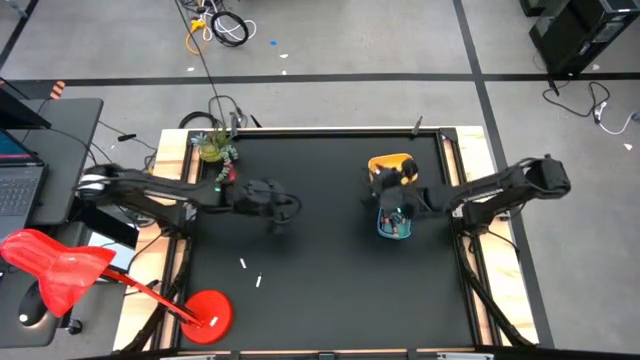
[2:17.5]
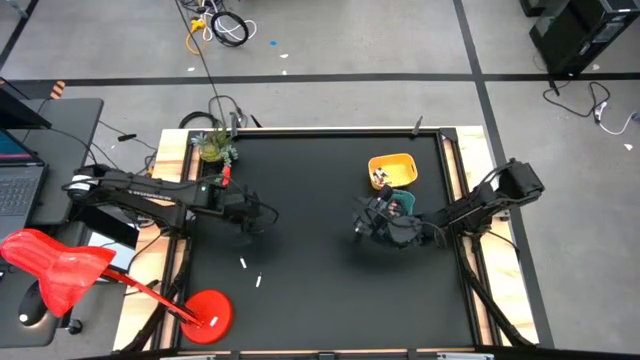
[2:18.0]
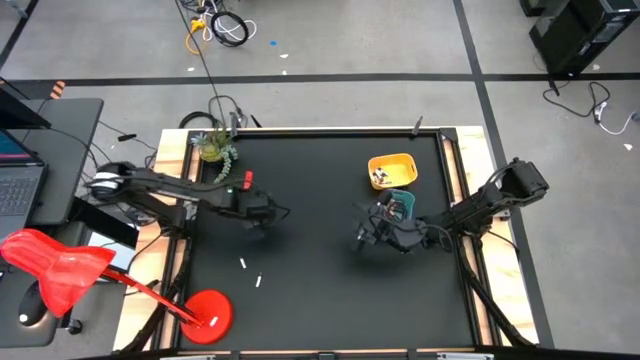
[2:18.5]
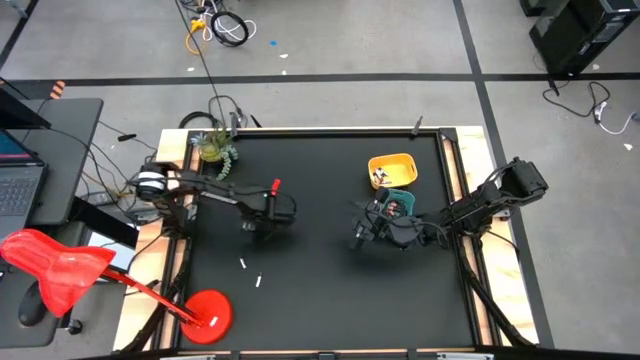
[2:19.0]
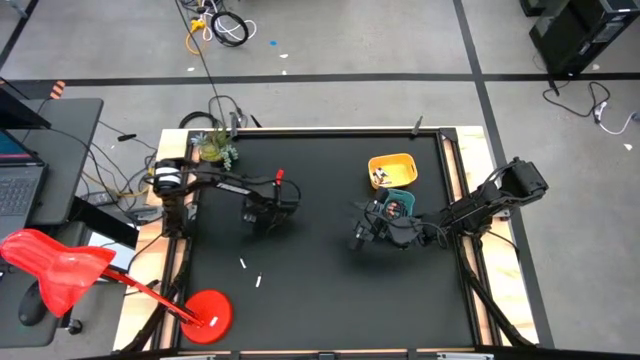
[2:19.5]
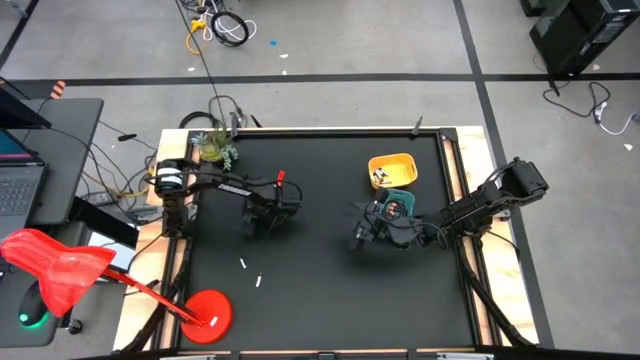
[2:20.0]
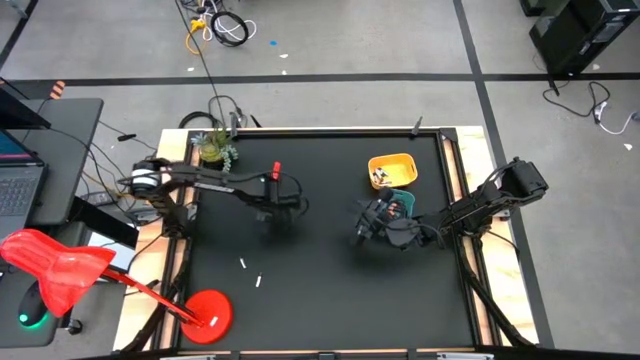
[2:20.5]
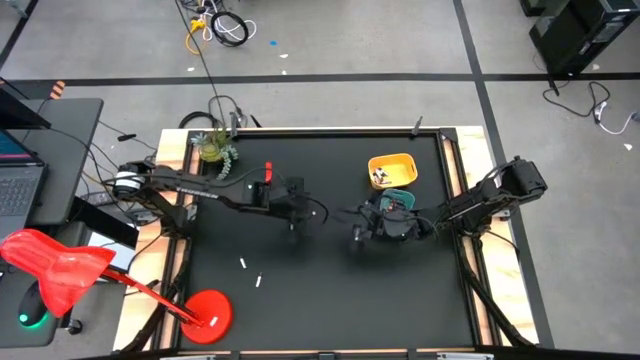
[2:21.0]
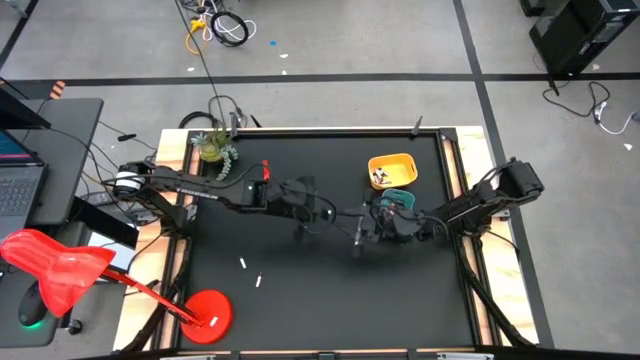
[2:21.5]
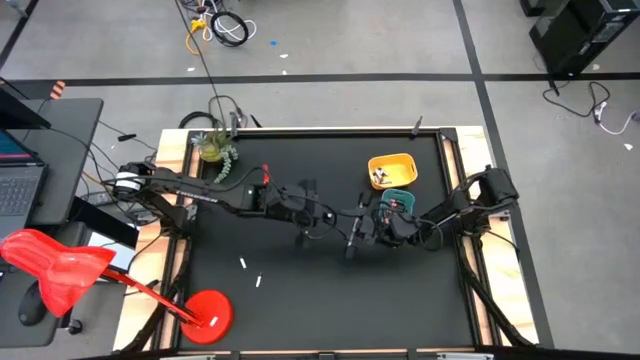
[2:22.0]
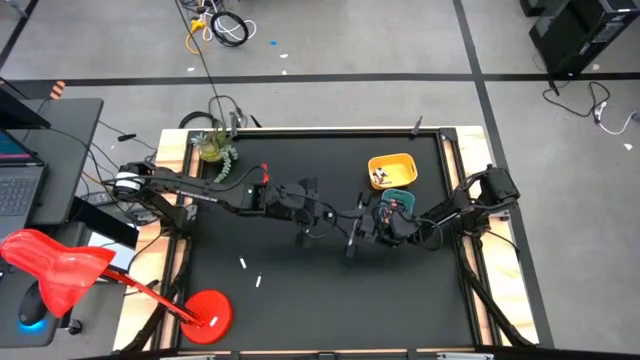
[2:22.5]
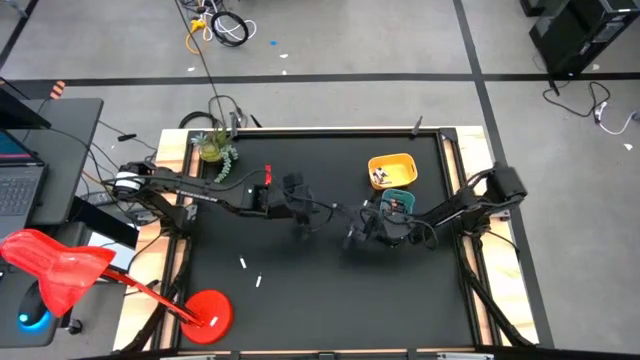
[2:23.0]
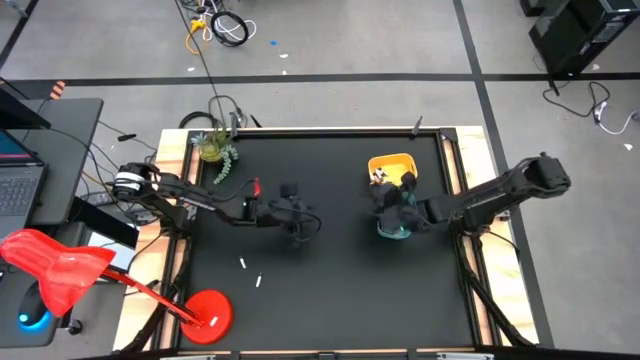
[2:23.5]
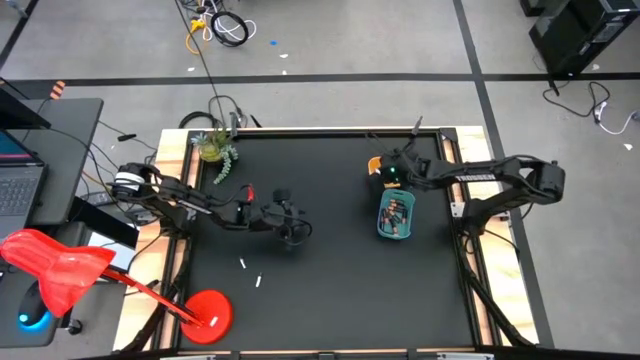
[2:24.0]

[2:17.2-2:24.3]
Task: Sort batteries
Put the top silver black battery into the yellow bin

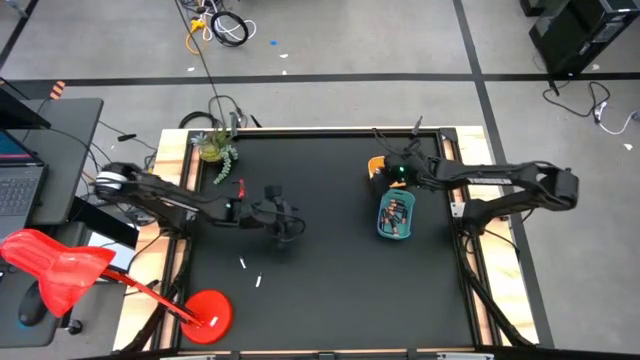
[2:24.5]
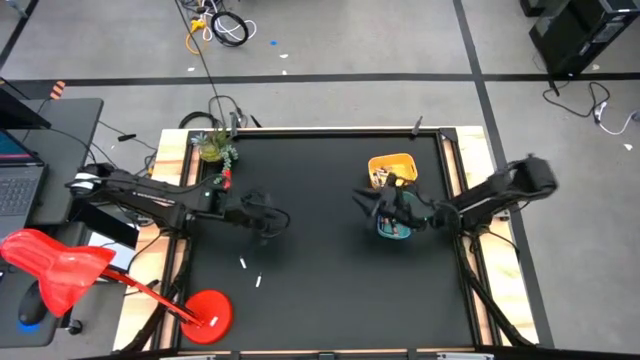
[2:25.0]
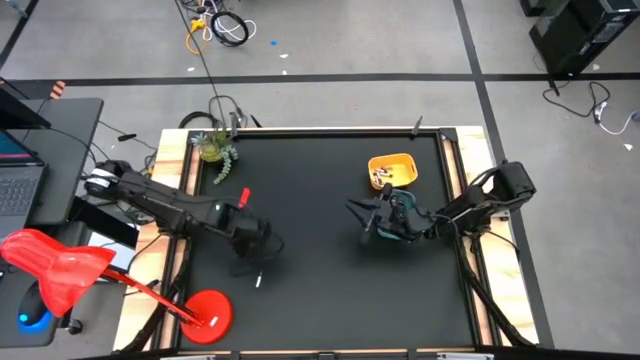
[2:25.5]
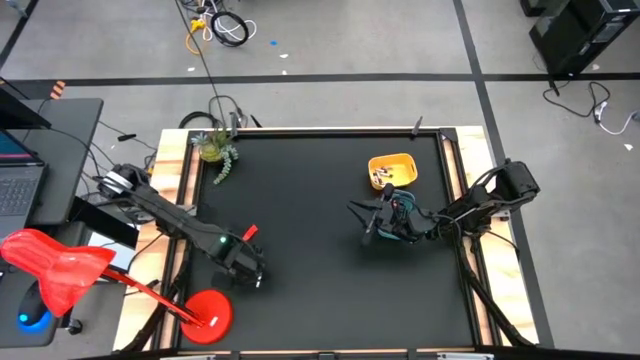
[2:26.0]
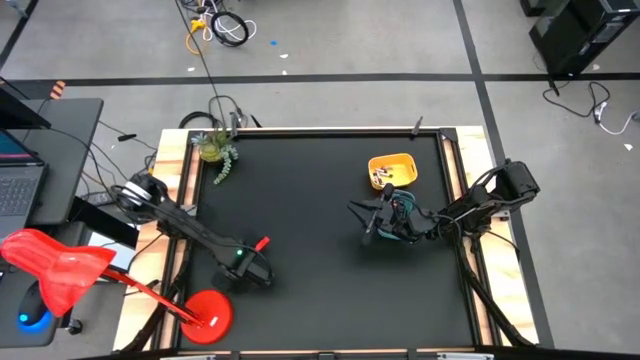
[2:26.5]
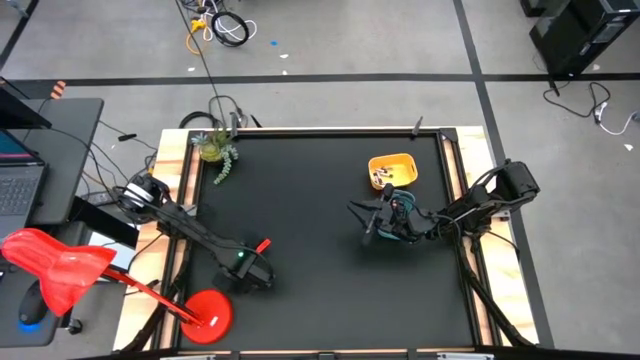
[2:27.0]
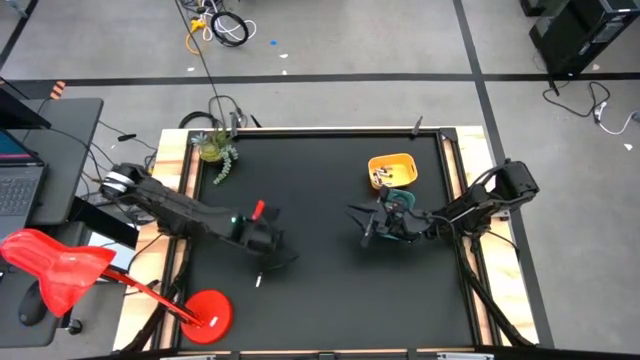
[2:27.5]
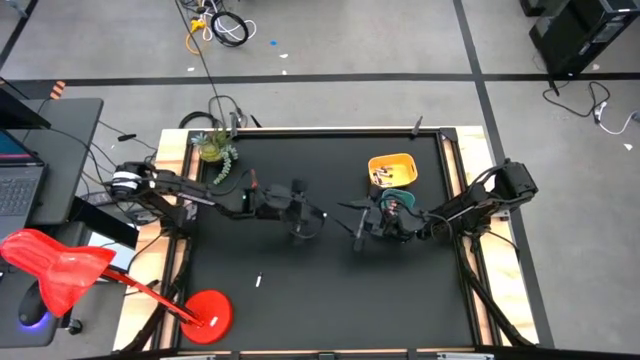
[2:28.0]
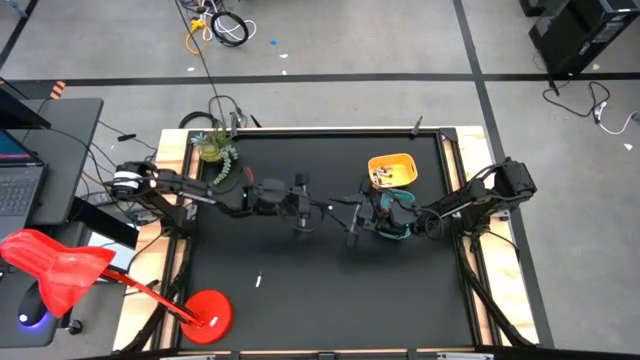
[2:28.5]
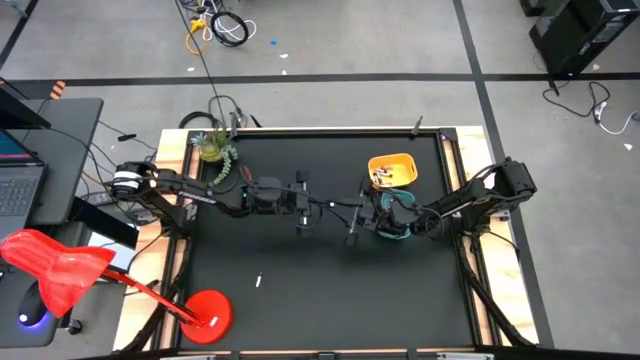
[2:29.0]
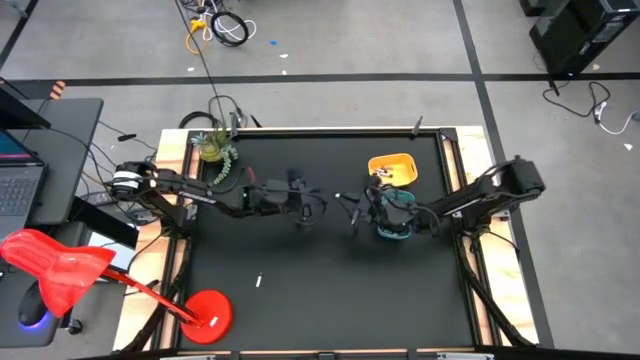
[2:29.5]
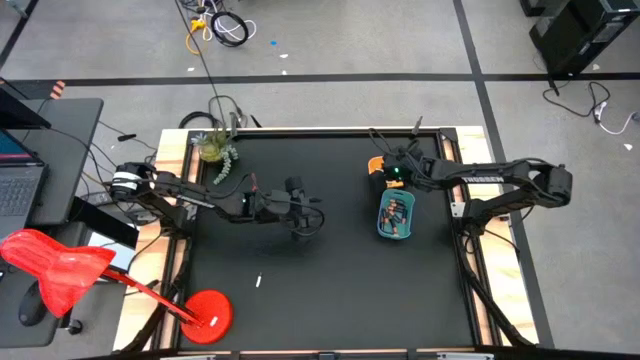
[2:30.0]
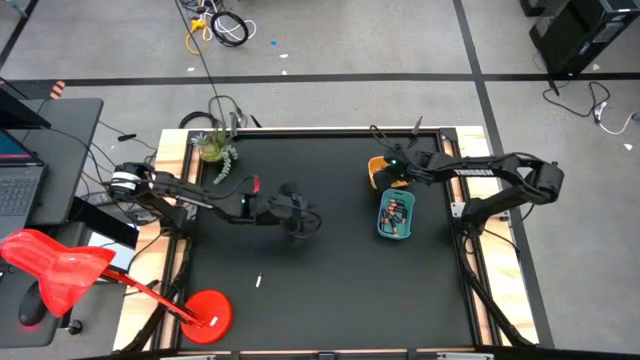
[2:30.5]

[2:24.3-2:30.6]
Put the top silver black battery into the yellow bin

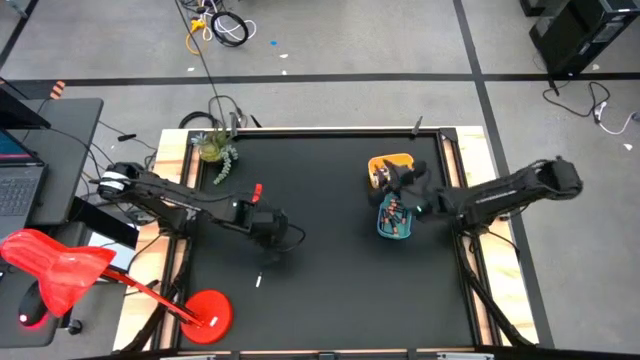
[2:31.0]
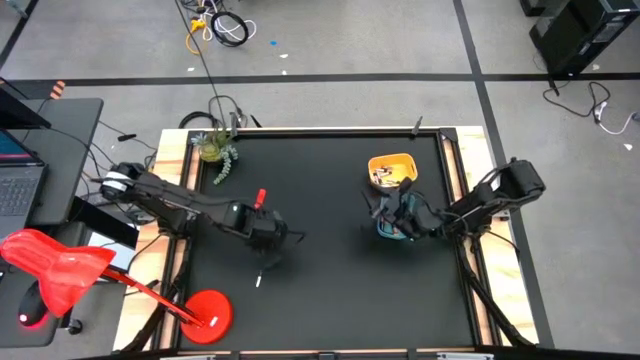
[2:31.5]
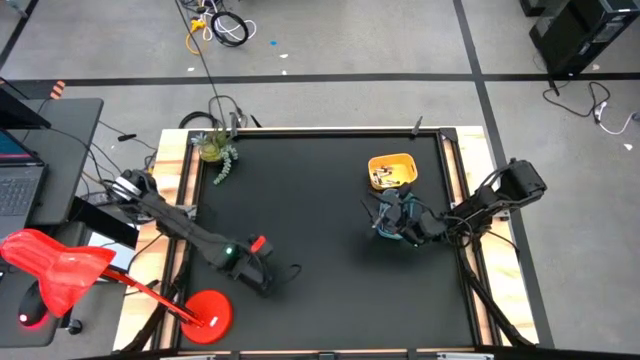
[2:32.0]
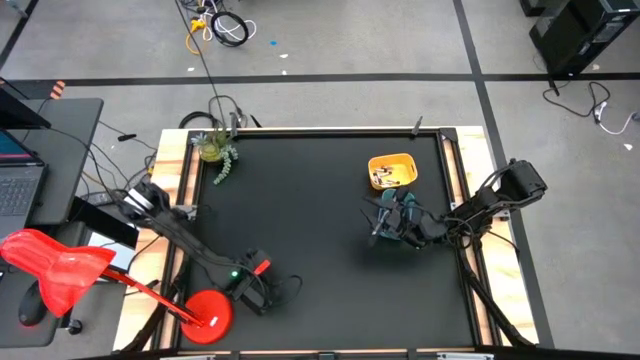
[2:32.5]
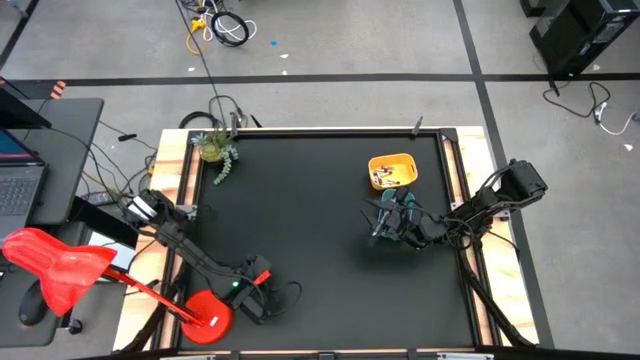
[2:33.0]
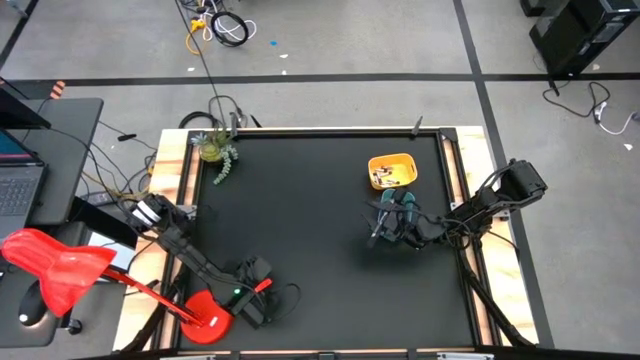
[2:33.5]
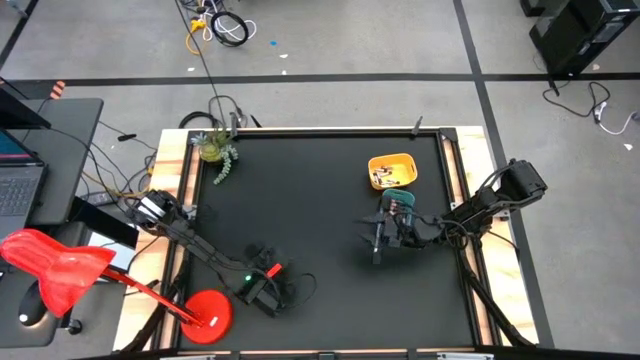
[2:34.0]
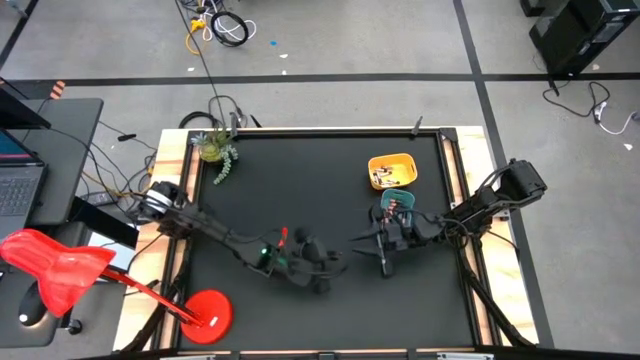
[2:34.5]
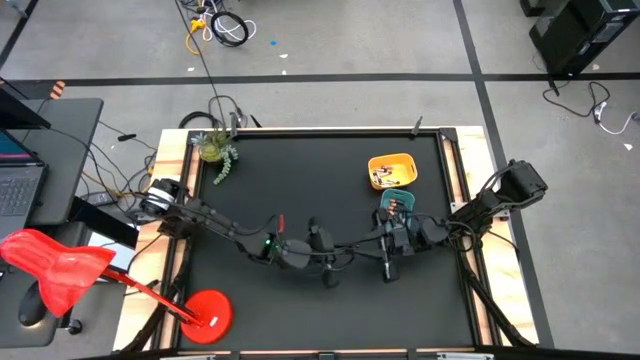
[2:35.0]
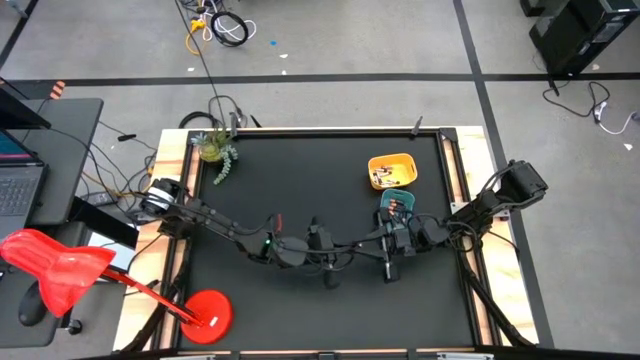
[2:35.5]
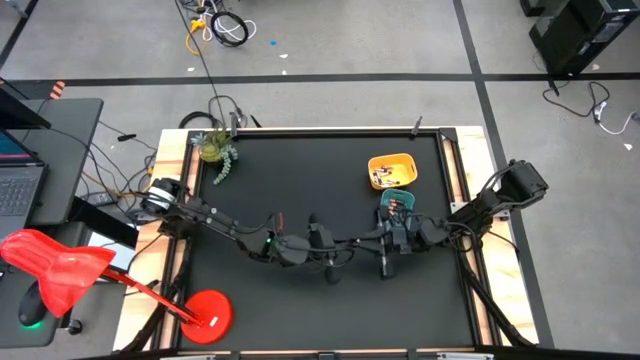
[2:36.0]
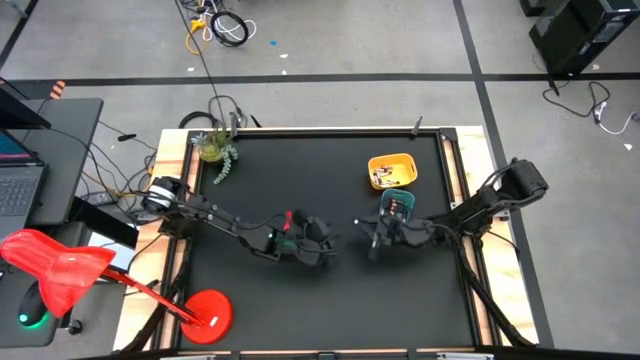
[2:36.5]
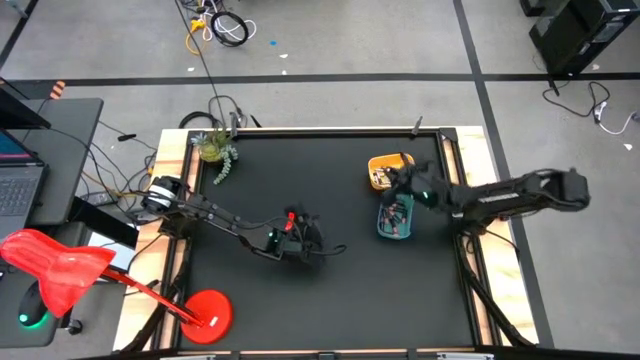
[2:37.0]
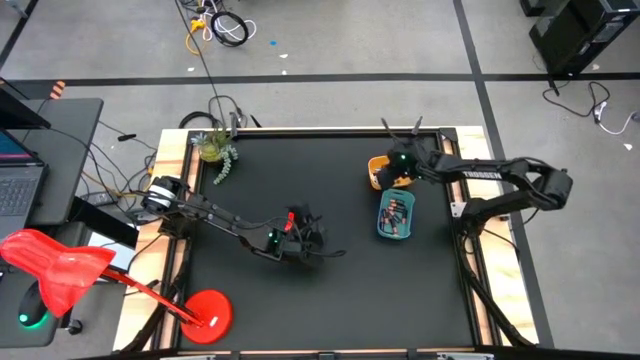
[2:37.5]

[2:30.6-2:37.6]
Put the silver black battery into the yellow bin
